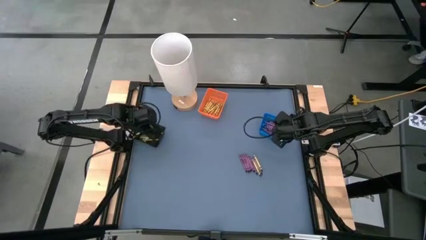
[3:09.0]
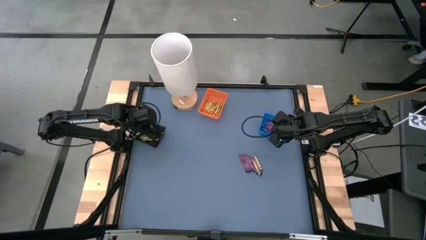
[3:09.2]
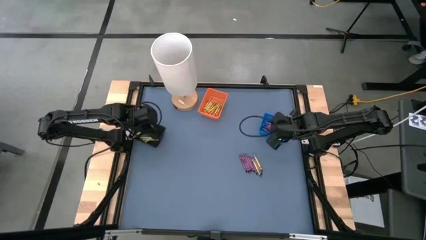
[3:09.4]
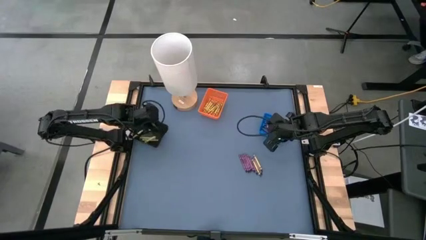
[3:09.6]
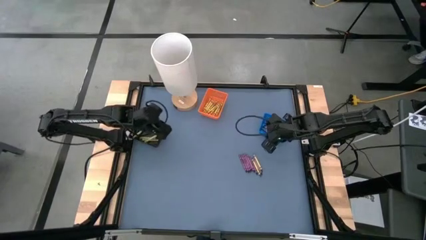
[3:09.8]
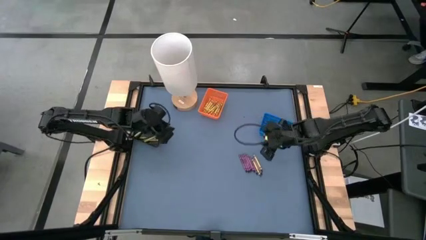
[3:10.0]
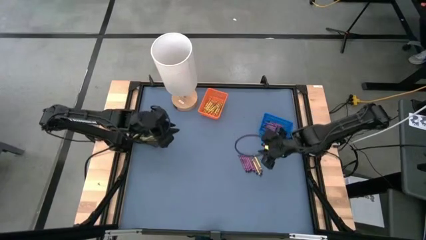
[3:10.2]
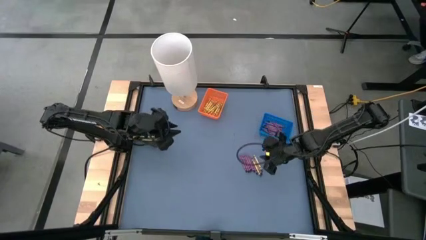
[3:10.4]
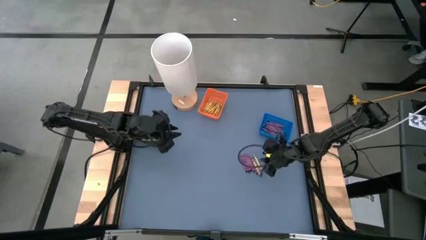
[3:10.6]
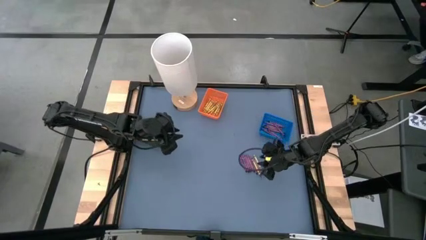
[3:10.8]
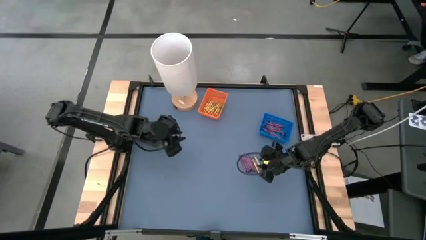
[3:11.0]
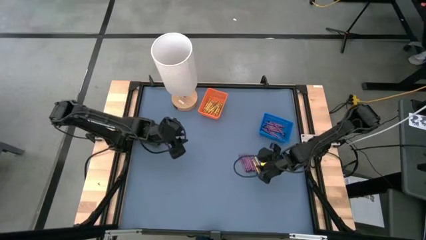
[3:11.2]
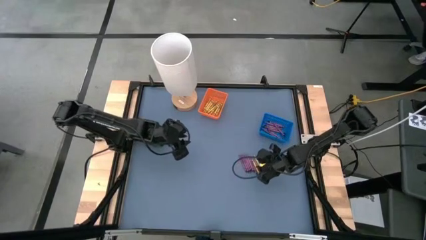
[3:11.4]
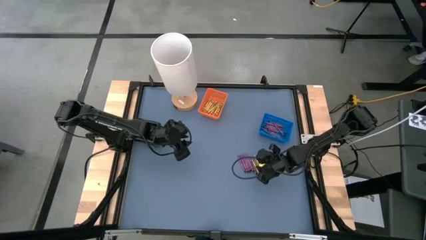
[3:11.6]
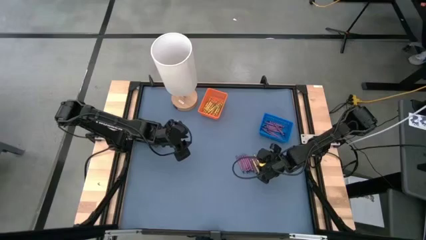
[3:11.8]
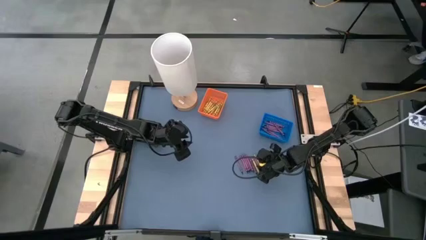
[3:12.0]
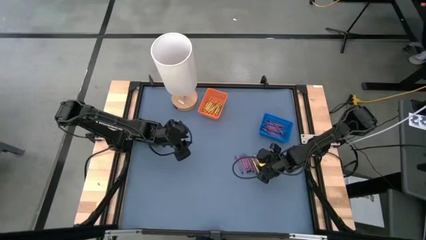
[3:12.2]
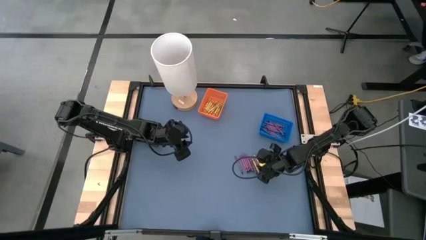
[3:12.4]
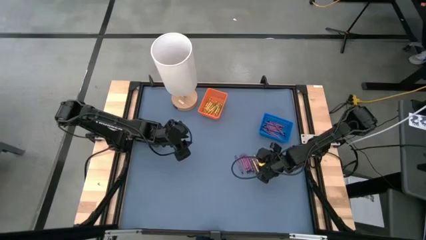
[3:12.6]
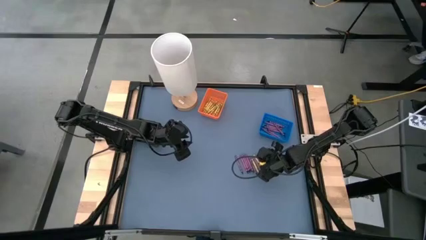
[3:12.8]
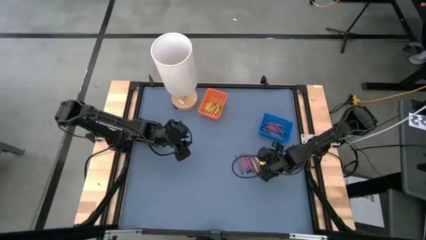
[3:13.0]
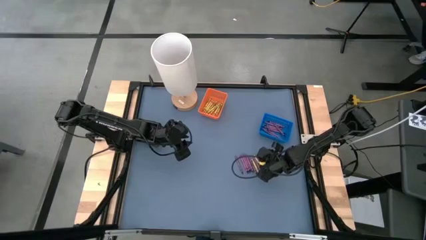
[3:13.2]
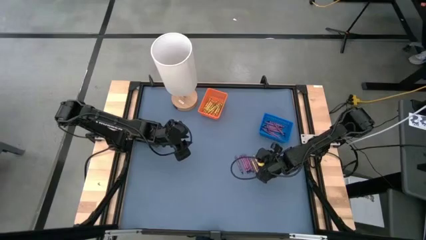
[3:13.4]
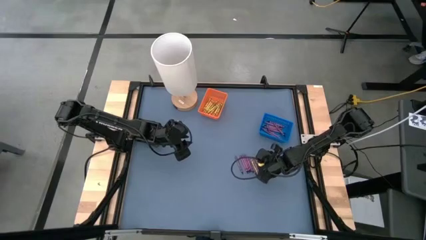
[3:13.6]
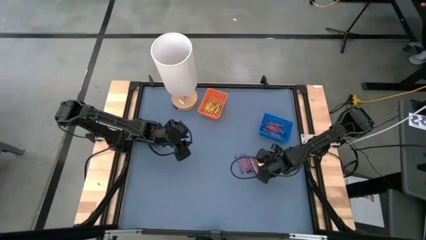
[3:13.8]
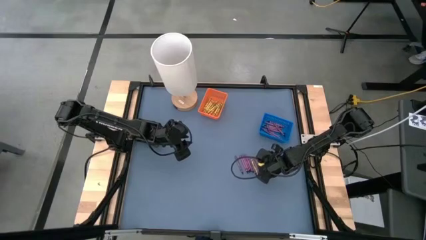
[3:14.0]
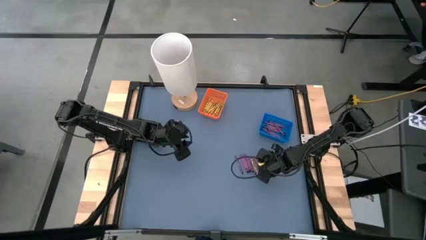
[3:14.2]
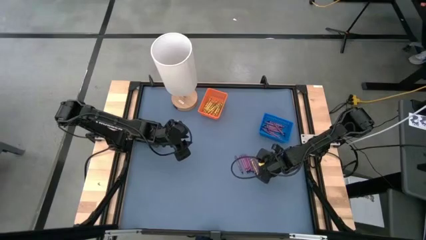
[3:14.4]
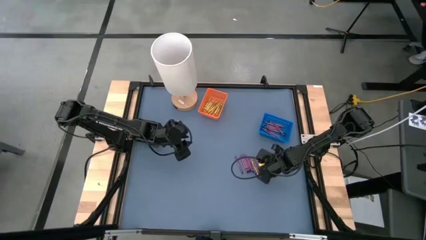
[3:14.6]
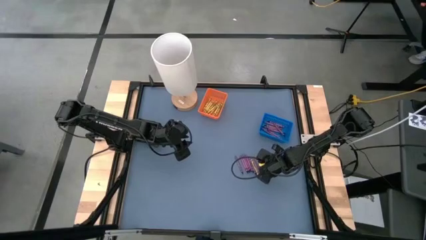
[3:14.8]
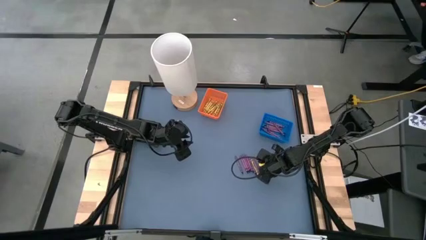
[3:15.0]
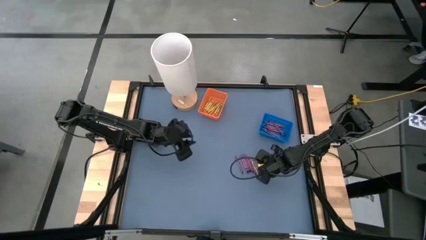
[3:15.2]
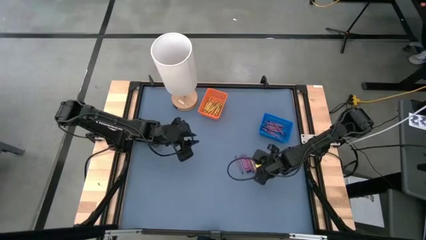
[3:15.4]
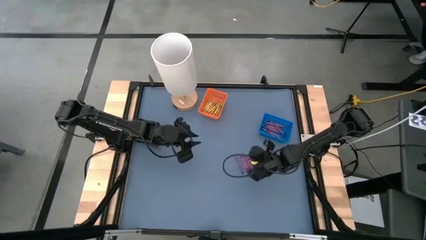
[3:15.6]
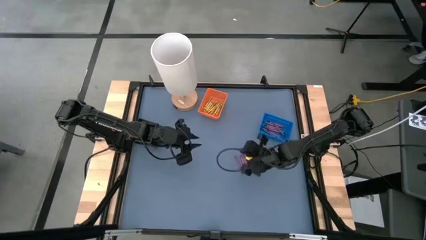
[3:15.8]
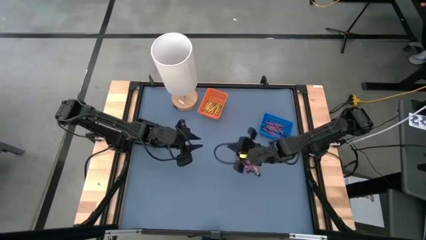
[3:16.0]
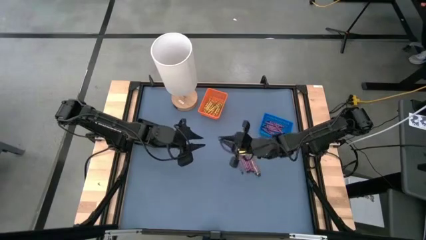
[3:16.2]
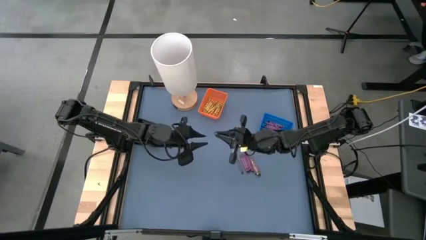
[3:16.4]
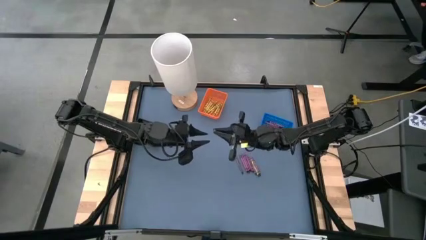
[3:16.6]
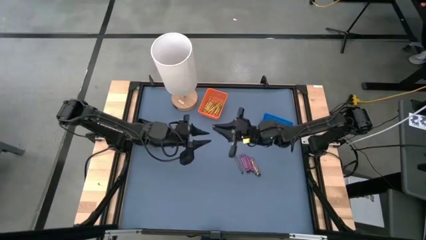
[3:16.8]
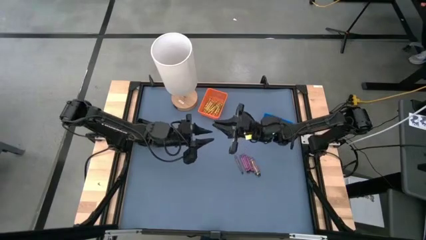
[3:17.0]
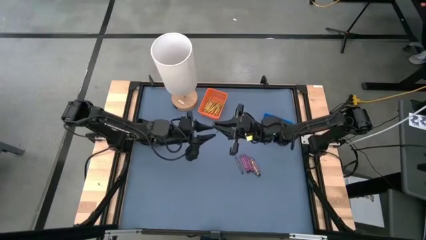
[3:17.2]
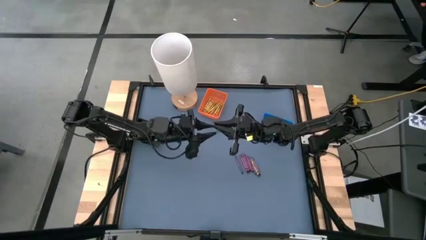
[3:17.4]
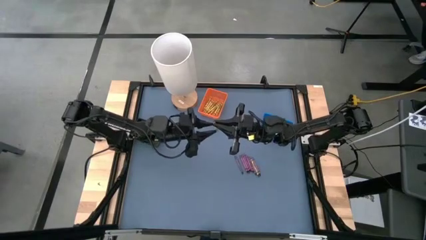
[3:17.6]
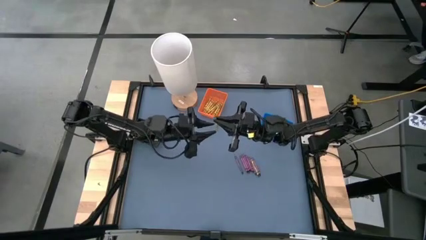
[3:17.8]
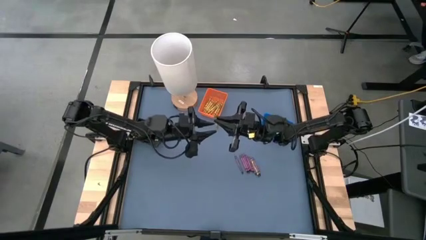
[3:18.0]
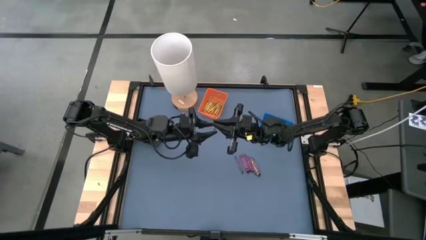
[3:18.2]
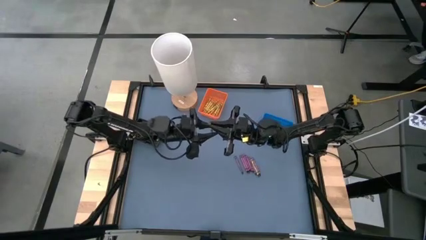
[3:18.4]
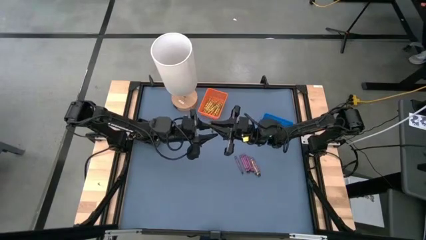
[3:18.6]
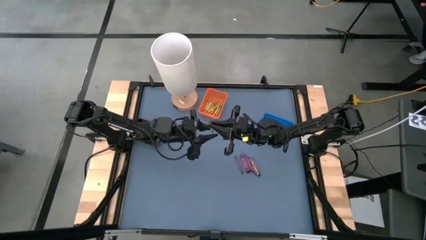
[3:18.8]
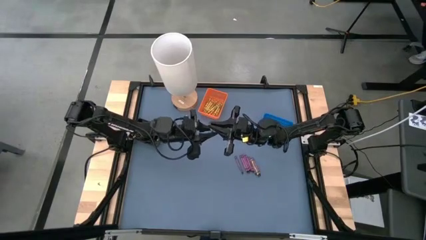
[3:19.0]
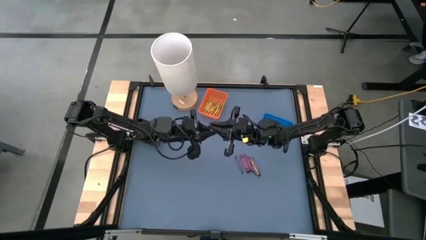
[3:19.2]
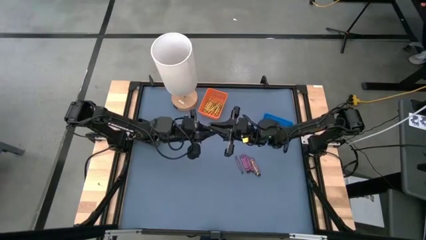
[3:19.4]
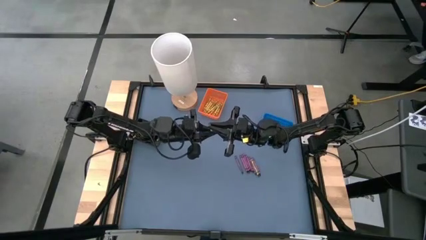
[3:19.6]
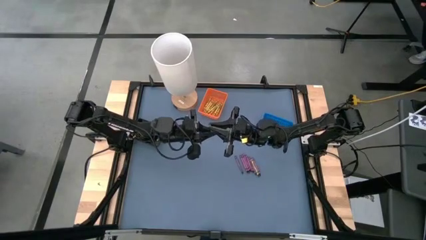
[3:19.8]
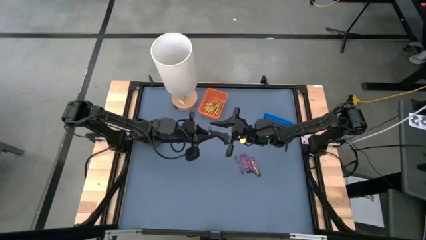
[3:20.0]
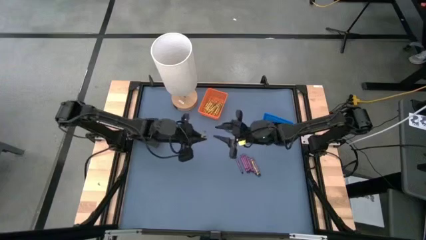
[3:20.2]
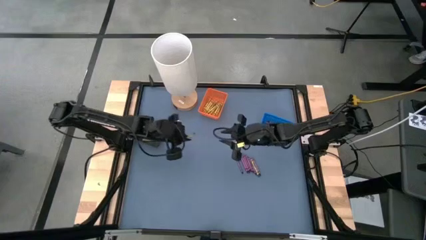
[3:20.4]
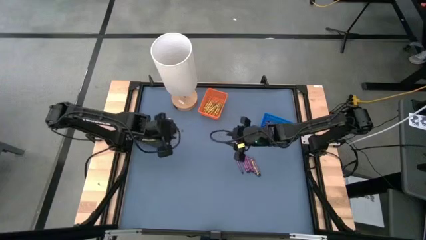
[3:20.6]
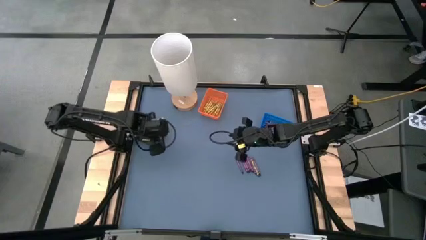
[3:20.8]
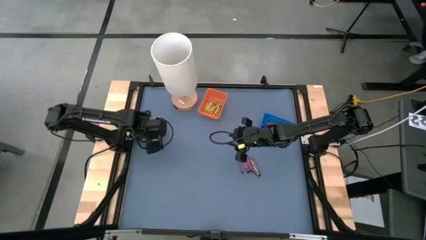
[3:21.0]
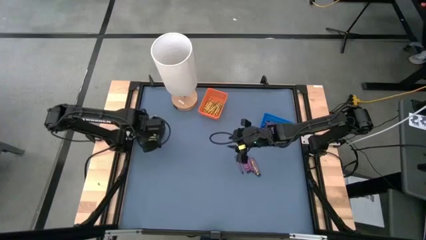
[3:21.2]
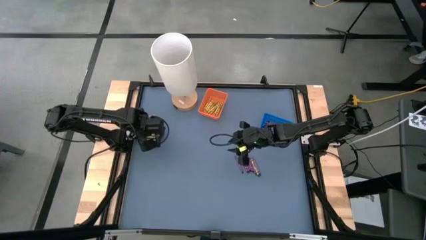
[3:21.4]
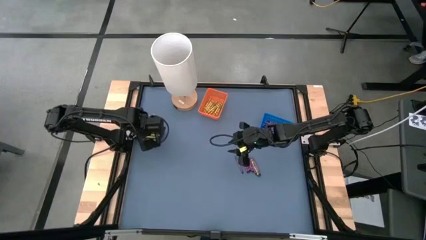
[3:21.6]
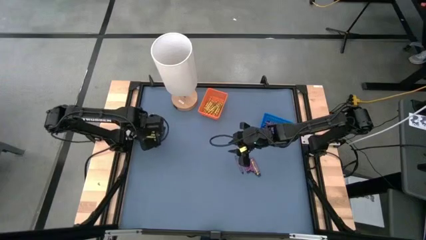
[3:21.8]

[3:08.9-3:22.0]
Task: Sort crayons
Put the green crayon into the black basket

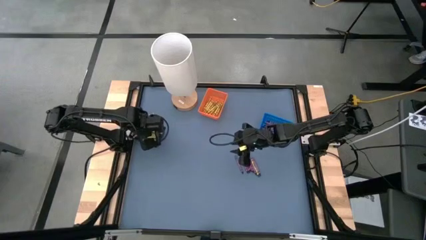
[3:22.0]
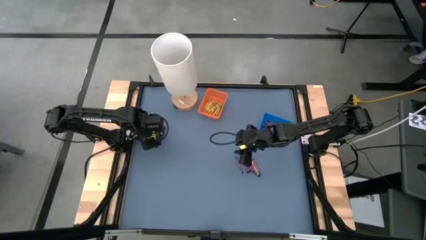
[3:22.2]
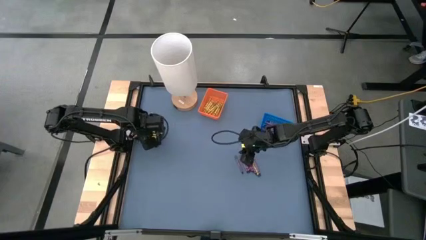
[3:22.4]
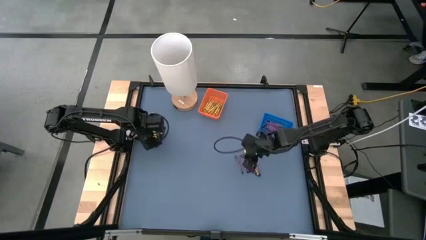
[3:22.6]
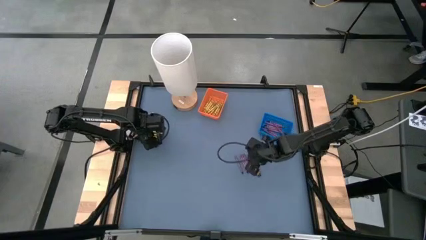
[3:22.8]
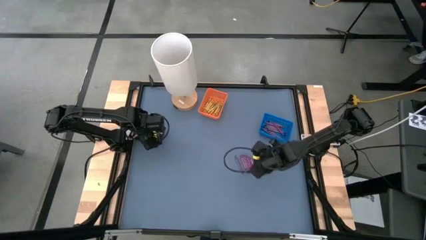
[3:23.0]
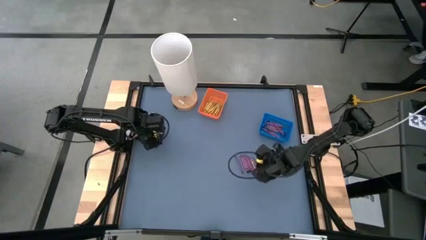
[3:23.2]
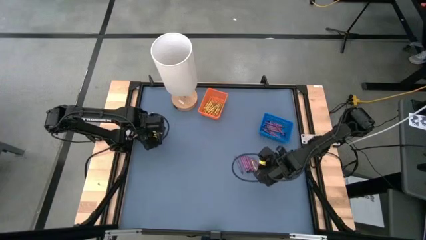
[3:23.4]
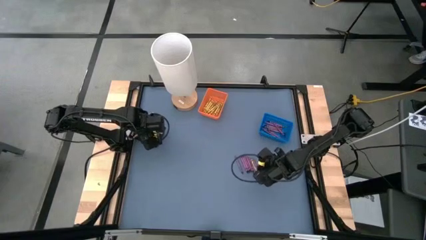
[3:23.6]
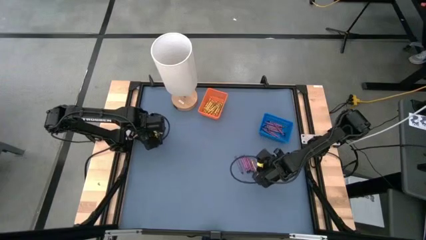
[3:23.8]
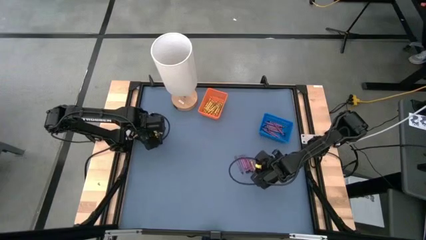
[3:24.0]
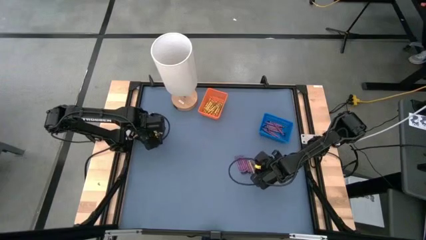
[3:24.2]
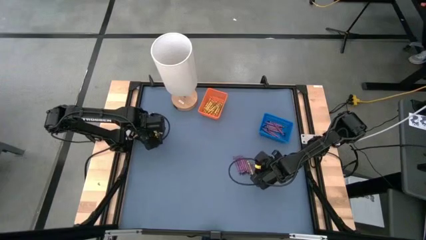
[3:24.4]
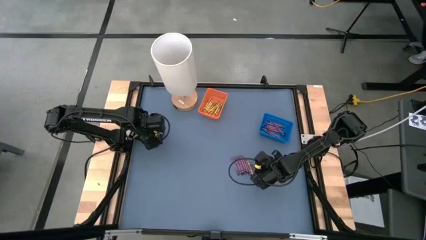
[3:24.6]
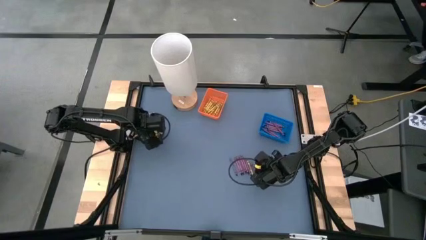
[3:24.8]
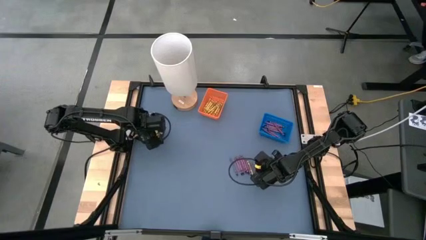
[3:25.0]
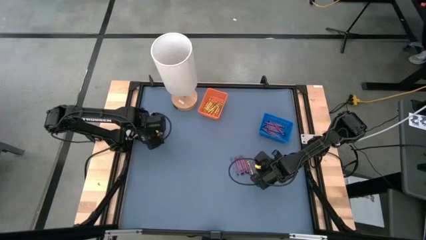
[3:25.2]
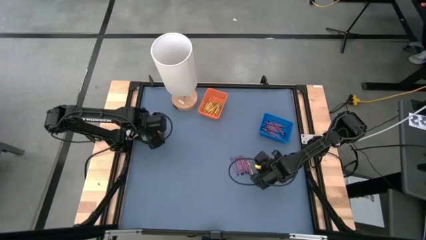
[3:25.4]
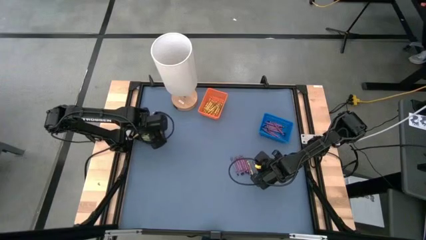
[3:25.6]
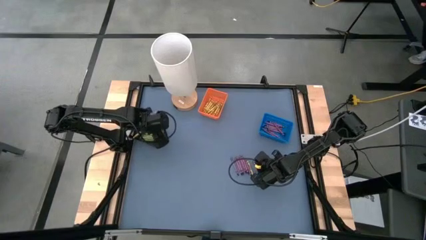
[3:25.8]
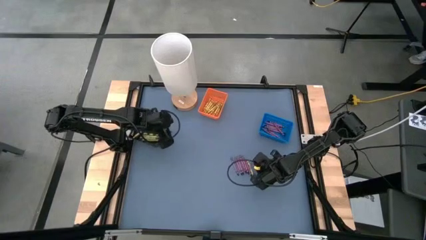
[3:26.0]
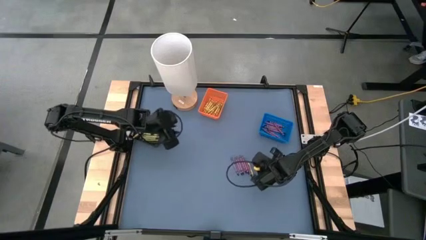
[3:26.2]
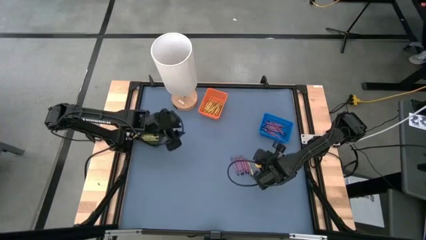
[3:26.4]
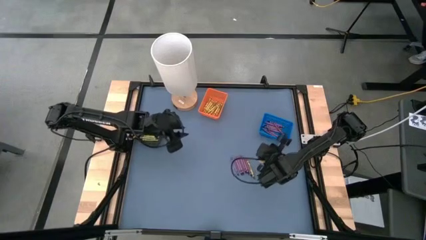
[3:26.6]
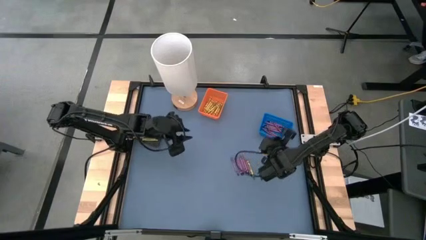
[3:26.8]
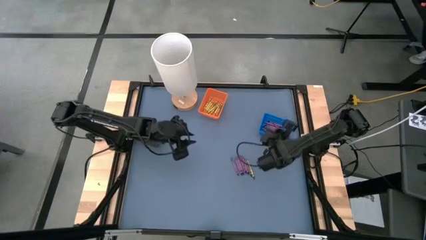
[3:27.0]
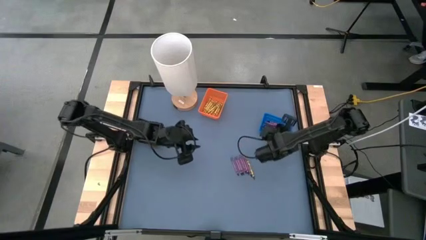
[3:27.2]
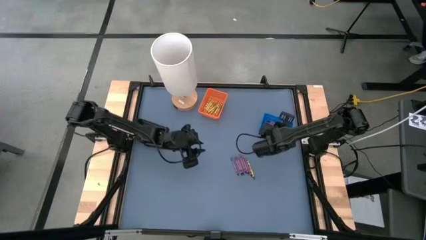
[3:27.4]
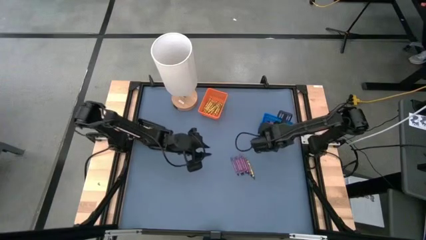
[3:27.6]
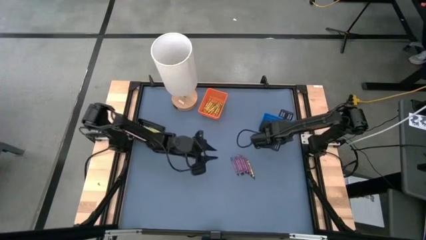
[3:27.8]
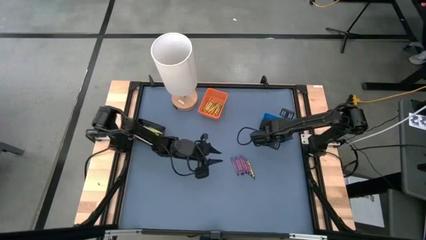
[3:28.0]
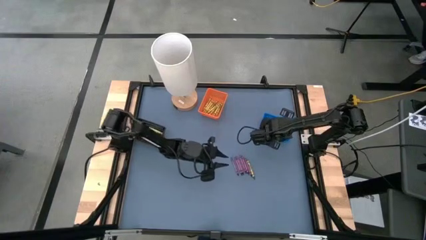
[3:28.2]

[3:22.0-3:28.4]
Put the violet crayon into the blue basket
